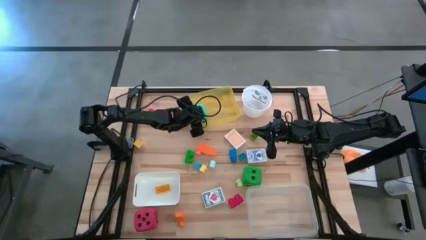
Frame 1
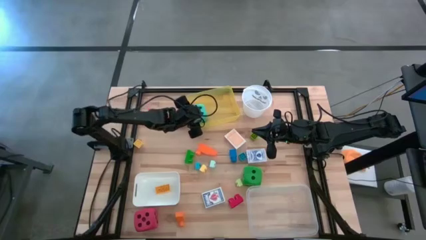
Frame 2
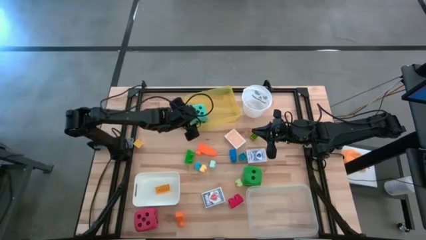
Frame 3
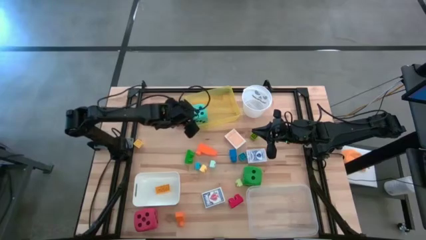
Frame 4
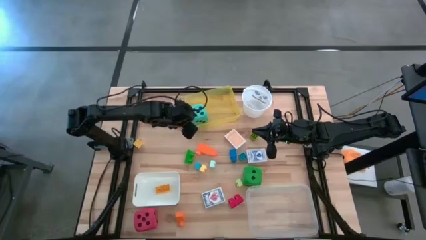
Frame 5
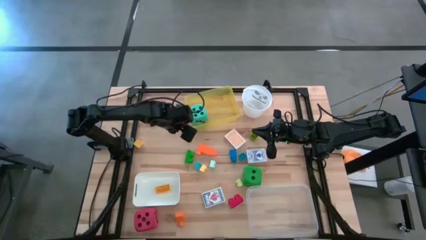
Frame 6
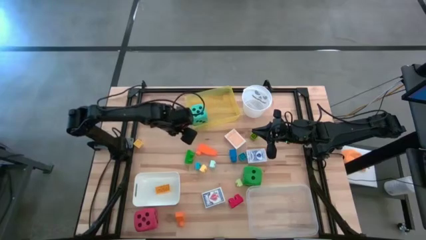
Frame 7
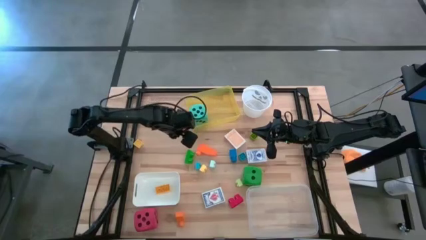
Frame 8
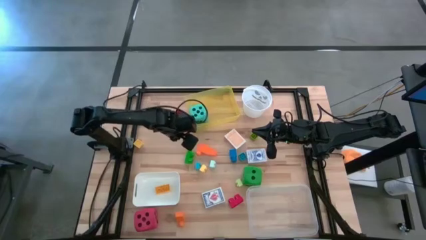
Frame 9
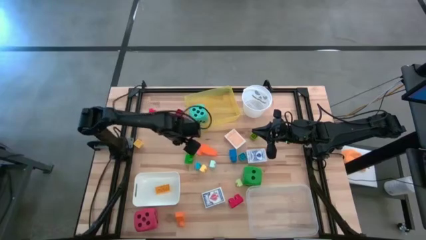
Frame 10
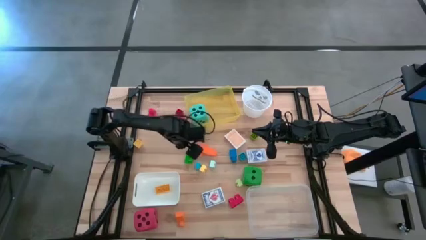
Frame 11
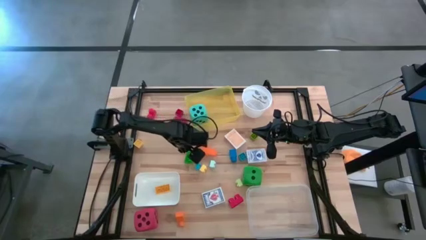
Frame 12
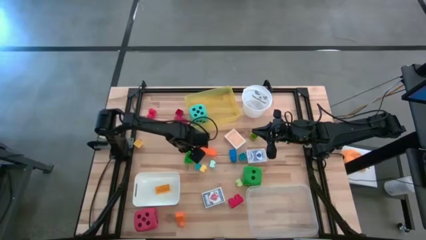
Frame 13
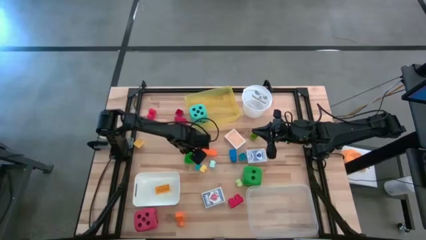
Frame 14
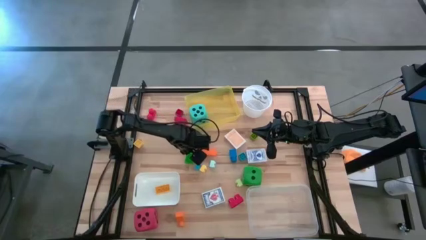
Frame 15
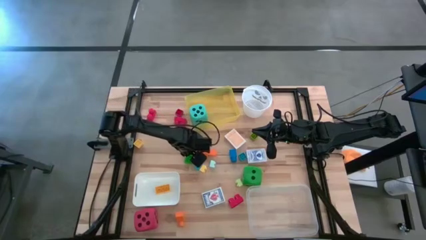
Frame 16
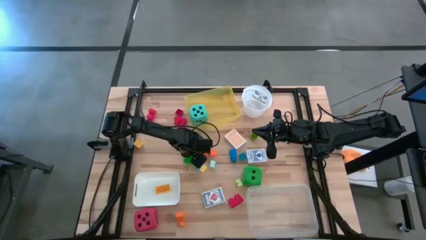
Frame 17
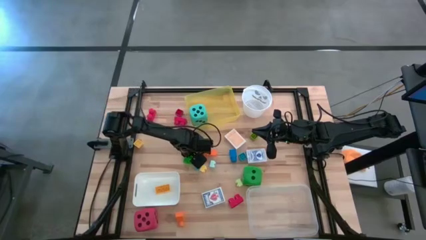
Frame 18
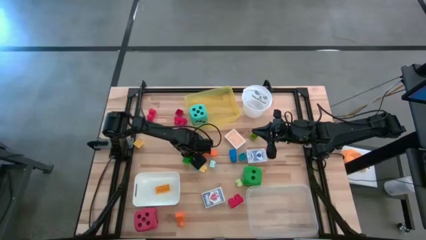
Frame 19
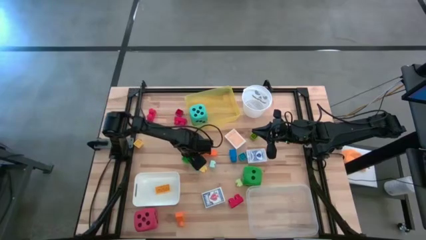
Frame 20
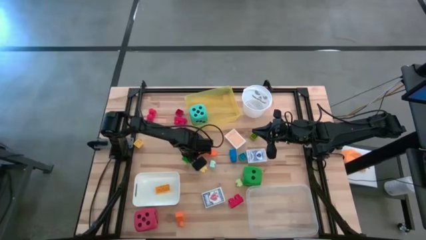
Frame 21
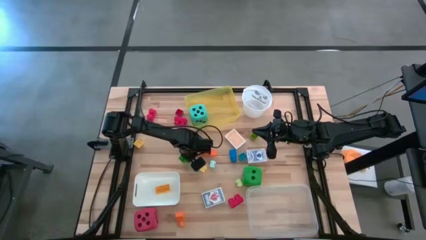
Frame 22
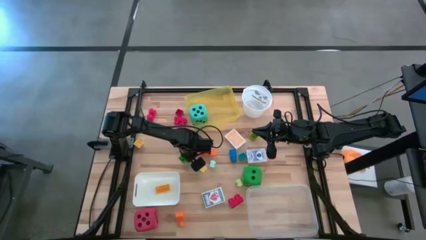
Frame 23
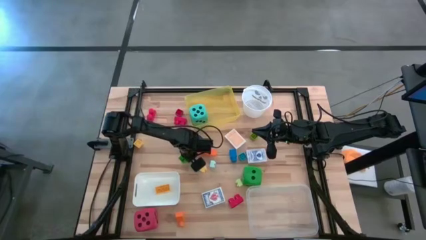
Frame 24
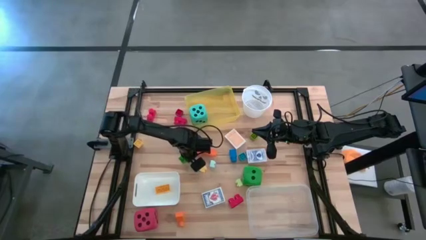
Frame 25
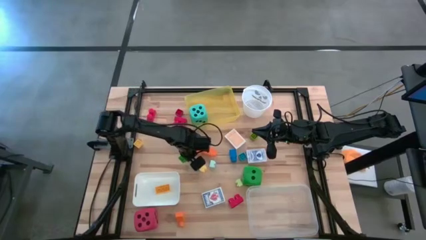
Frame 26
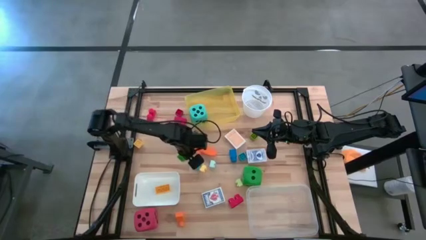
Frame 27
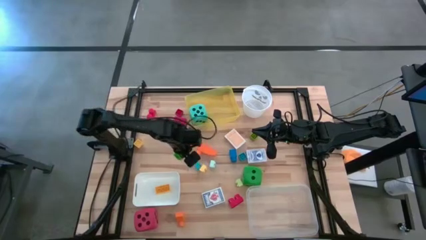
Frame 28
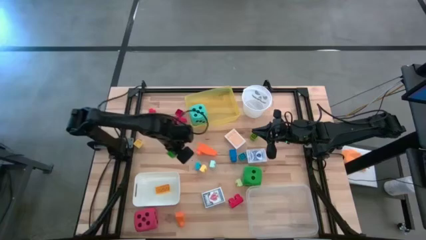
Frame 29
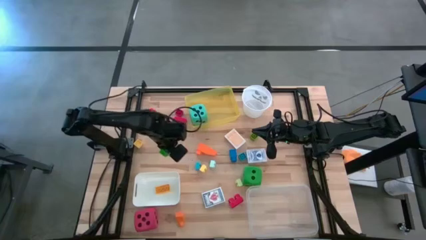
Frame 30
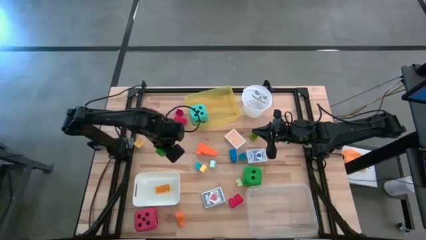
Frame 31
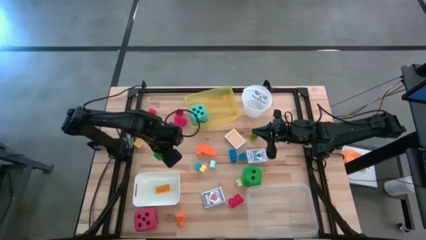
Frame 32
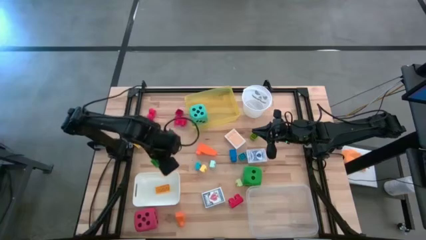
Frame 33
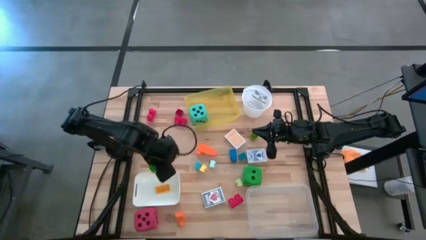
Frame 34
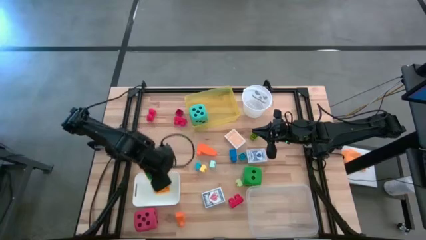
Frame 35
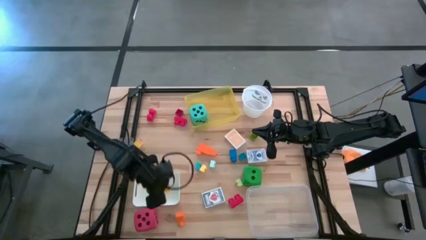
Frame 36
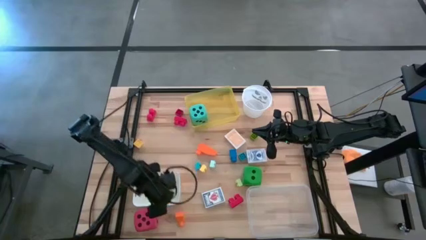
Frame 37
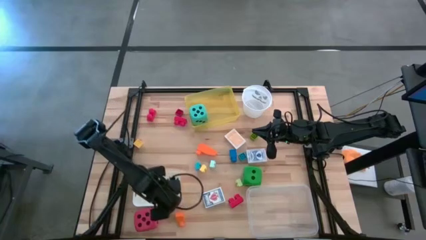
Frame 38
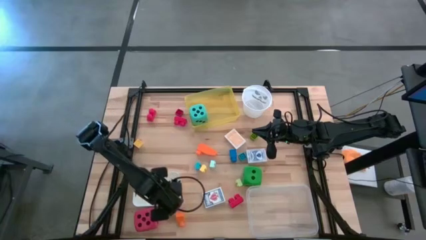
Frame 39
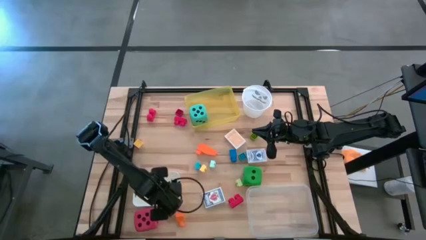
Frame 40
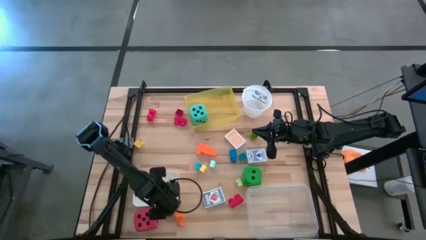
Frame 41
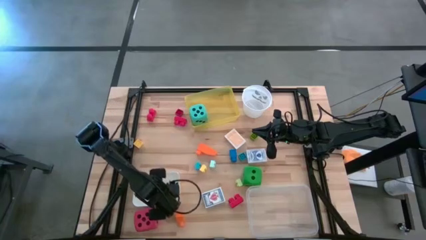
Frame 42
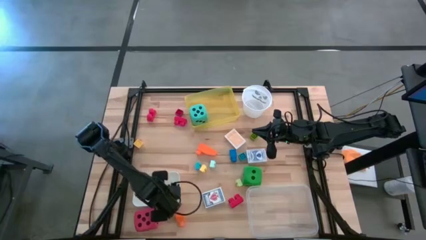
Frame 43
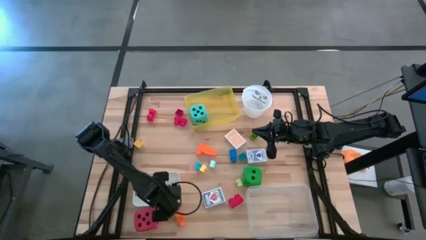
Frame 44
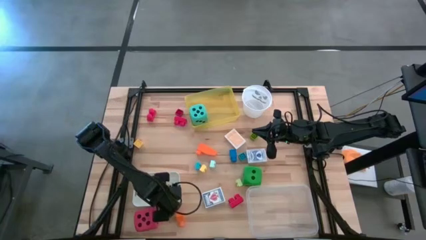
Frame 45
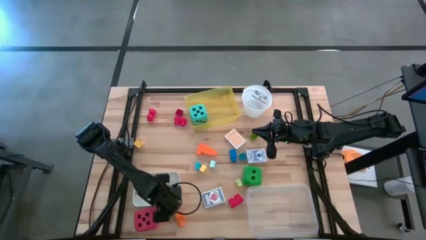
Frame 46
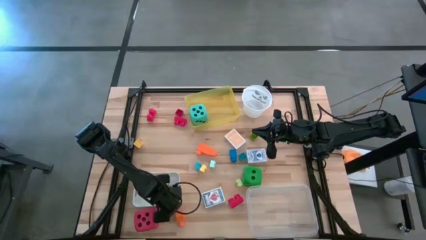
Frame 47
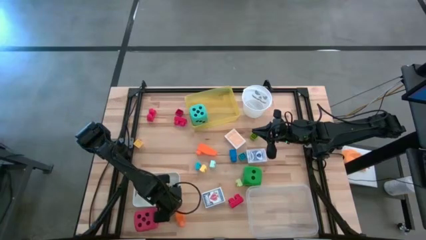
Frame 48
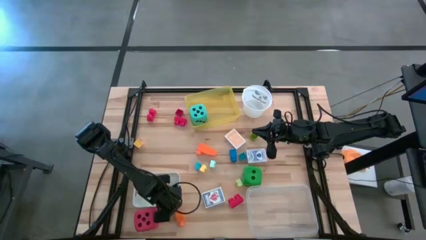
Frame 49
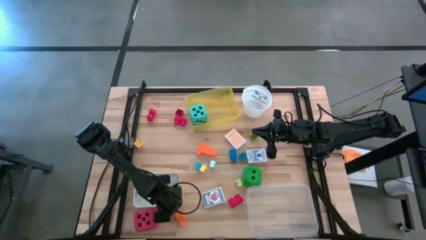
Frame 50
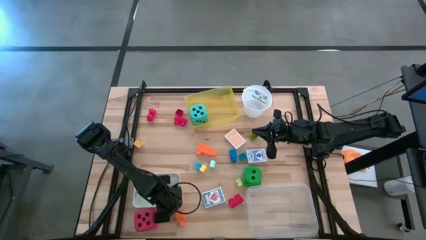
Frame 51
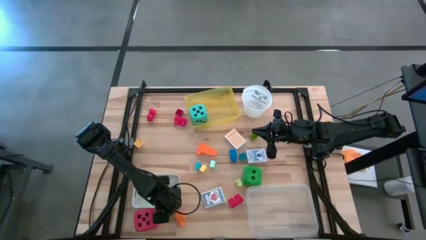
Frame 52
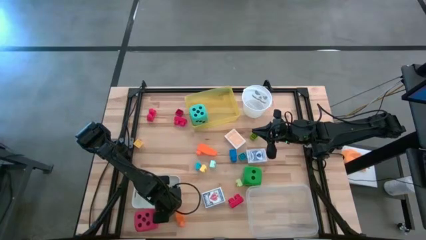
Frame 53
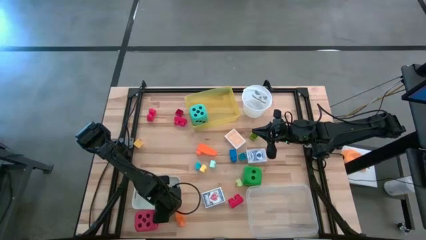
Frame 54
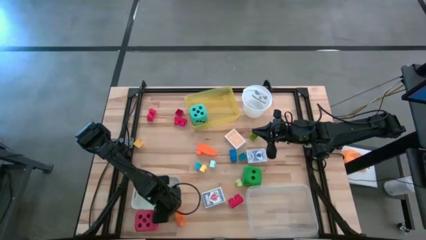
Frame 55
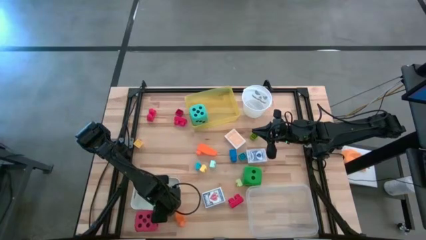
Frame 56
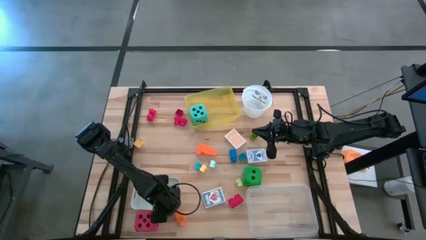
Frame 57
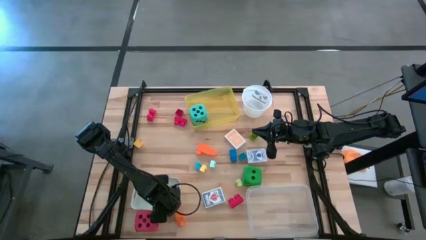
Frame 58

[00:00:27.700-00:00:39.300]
Task: Pick & Place Toys
Put the green game piece into the white bin
